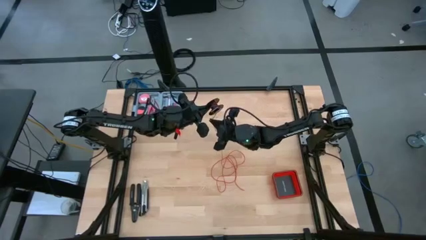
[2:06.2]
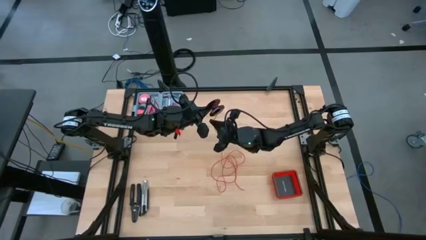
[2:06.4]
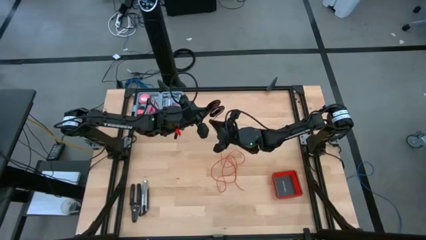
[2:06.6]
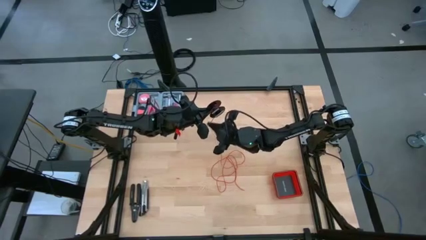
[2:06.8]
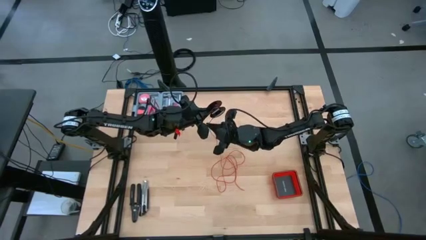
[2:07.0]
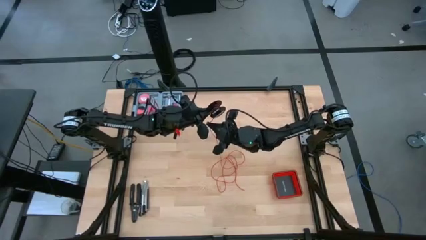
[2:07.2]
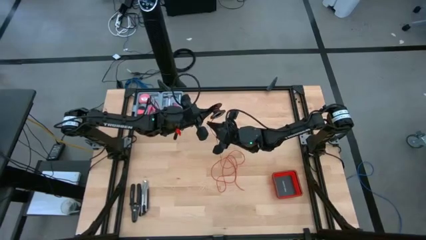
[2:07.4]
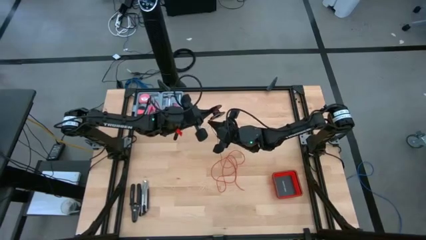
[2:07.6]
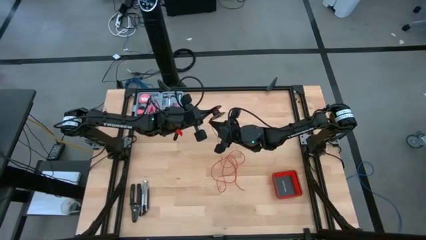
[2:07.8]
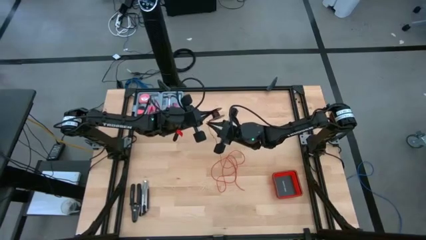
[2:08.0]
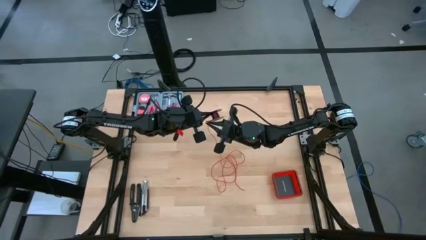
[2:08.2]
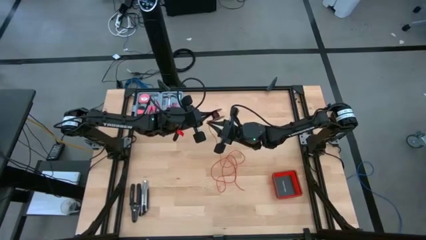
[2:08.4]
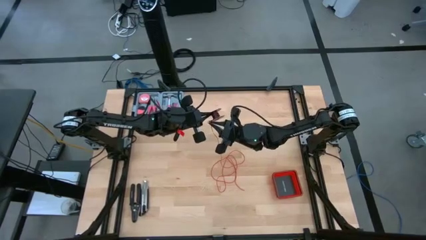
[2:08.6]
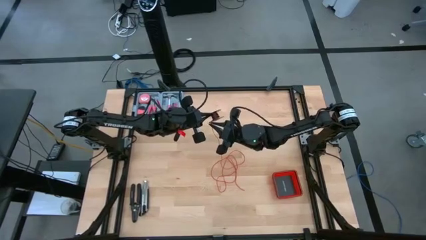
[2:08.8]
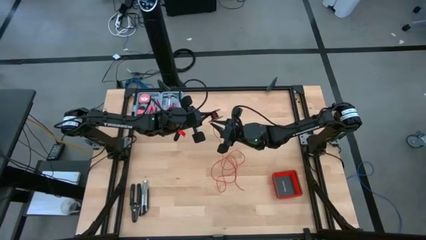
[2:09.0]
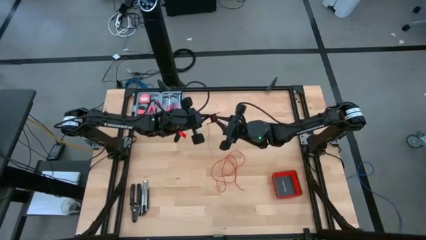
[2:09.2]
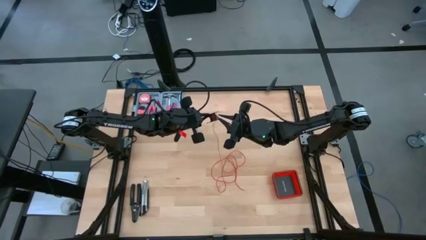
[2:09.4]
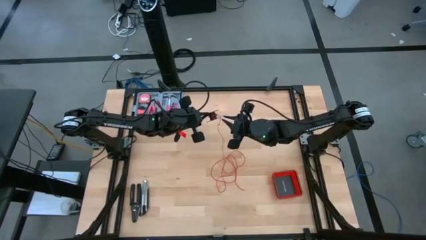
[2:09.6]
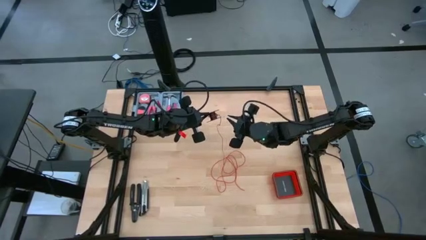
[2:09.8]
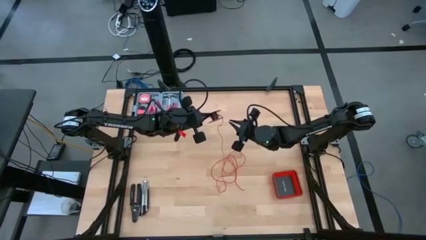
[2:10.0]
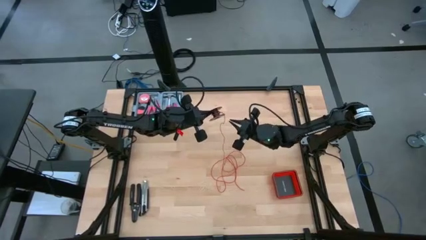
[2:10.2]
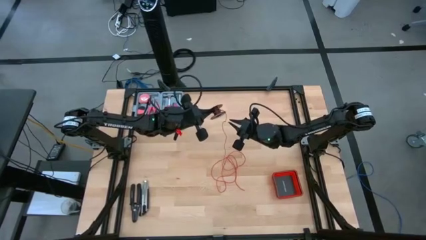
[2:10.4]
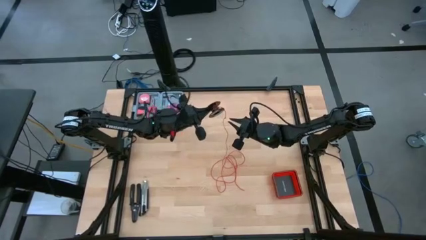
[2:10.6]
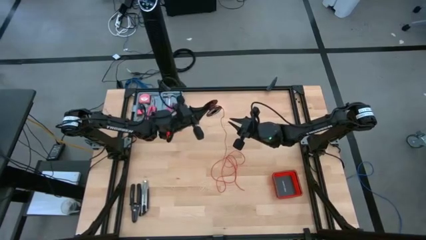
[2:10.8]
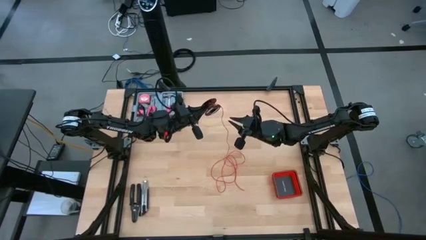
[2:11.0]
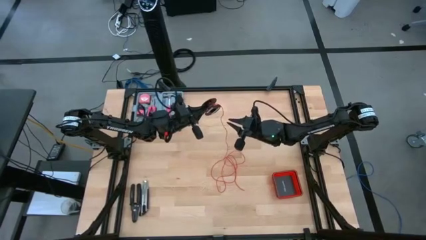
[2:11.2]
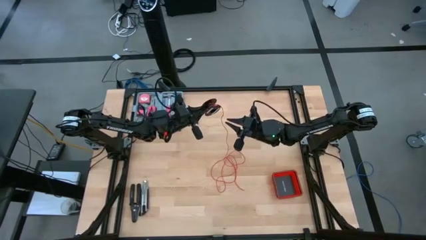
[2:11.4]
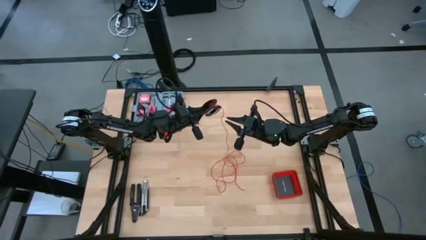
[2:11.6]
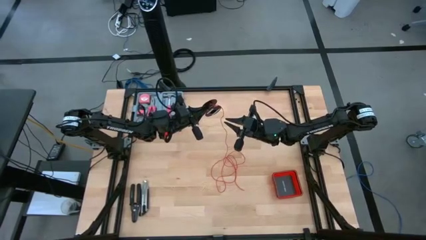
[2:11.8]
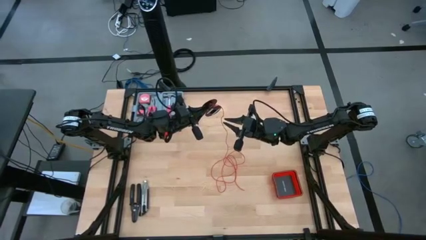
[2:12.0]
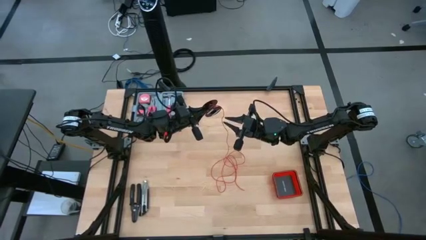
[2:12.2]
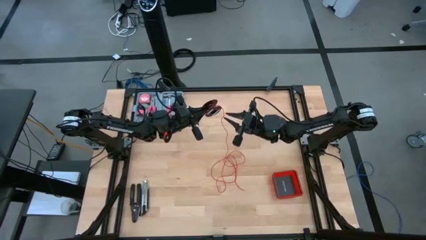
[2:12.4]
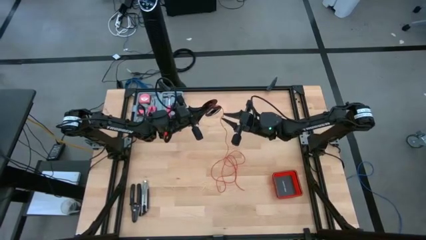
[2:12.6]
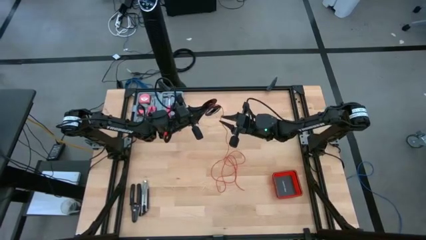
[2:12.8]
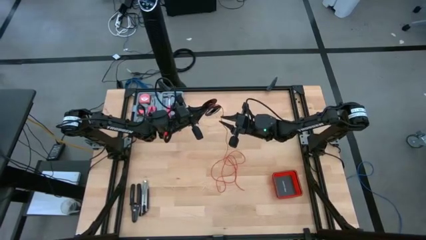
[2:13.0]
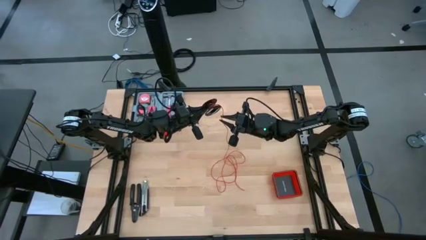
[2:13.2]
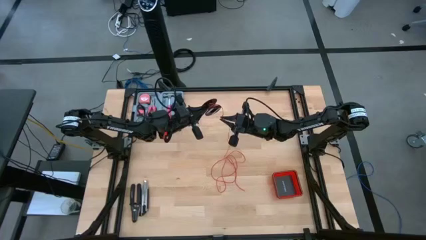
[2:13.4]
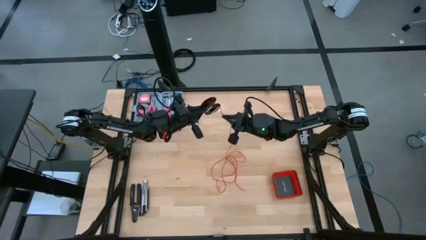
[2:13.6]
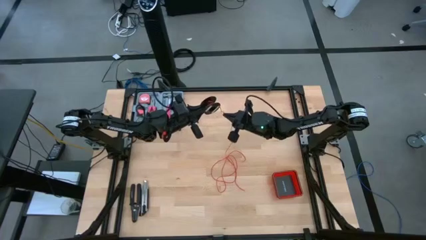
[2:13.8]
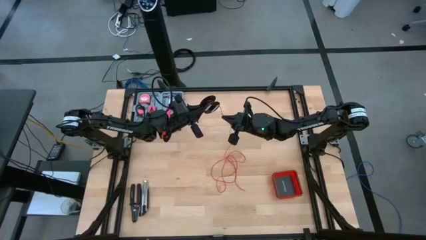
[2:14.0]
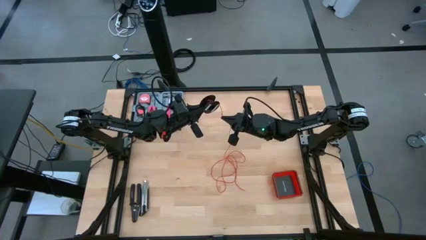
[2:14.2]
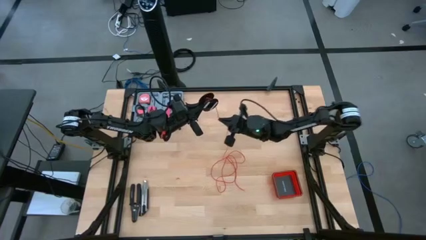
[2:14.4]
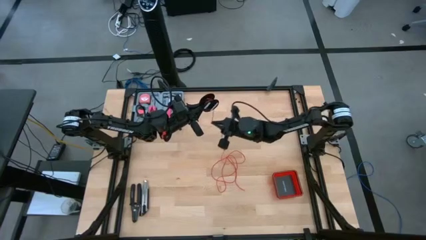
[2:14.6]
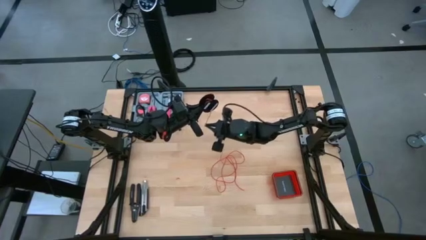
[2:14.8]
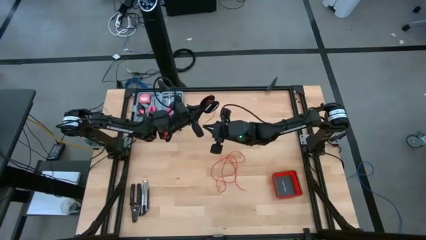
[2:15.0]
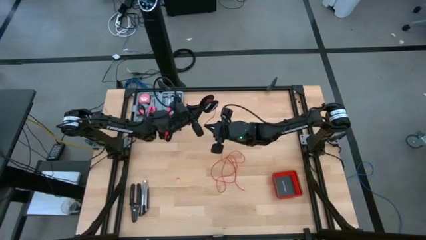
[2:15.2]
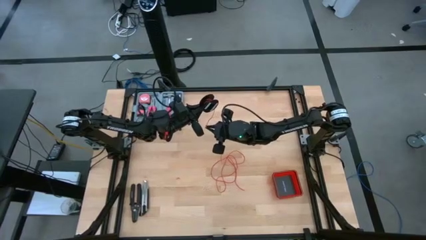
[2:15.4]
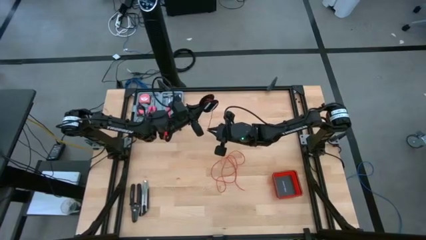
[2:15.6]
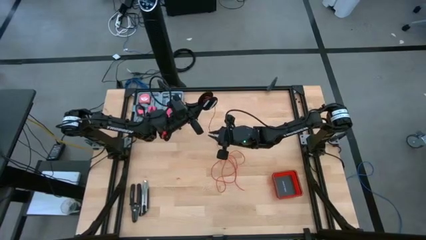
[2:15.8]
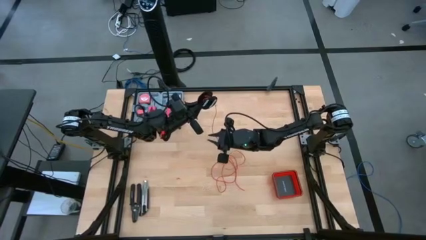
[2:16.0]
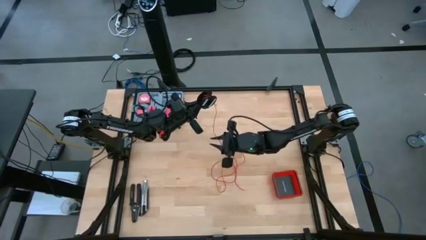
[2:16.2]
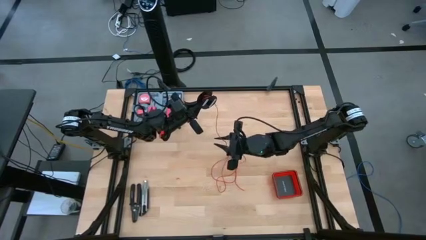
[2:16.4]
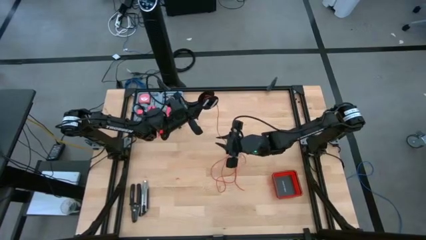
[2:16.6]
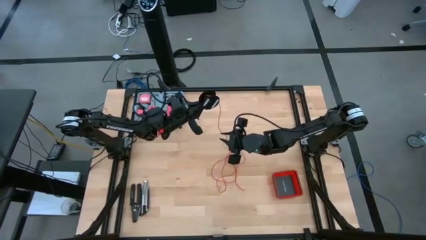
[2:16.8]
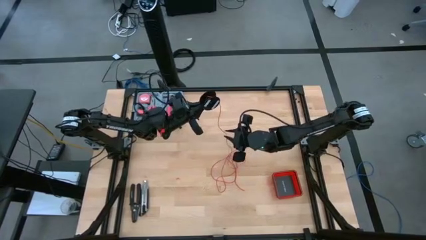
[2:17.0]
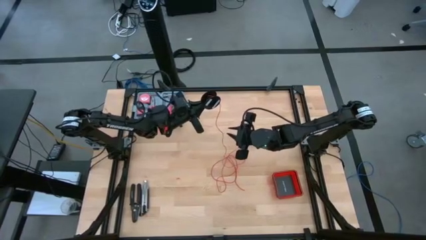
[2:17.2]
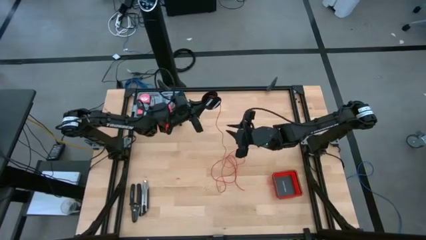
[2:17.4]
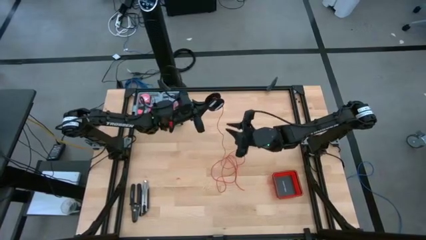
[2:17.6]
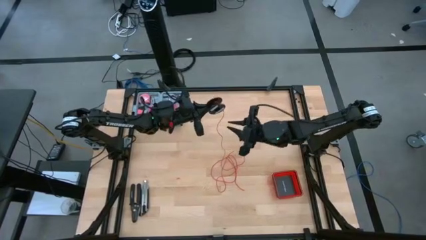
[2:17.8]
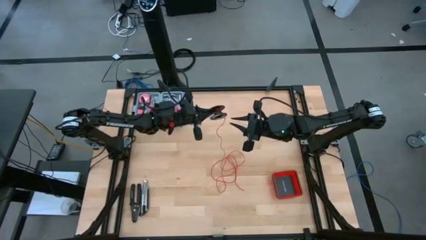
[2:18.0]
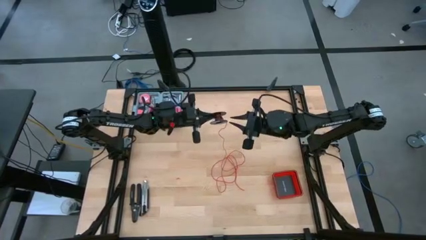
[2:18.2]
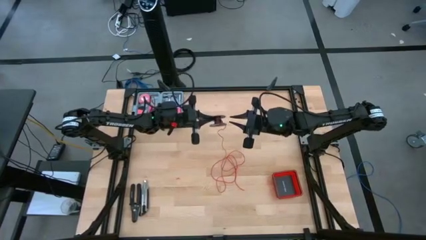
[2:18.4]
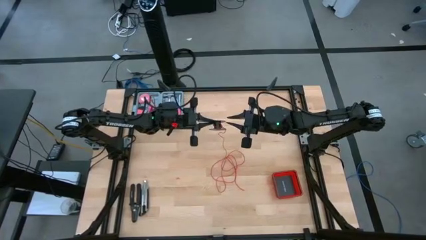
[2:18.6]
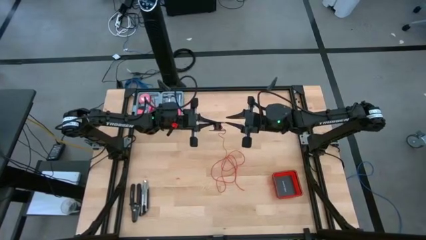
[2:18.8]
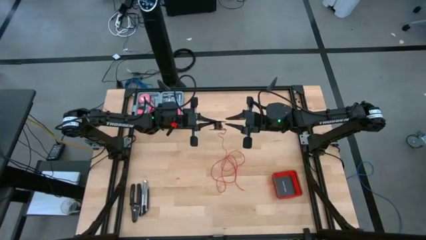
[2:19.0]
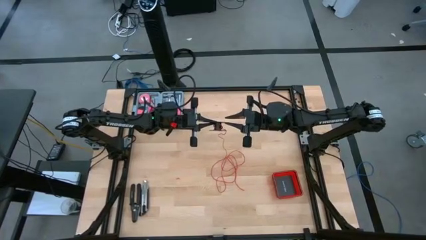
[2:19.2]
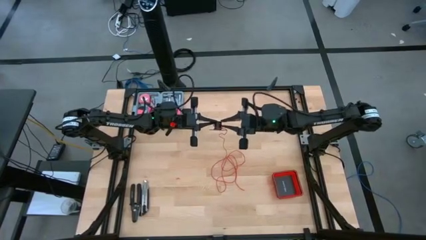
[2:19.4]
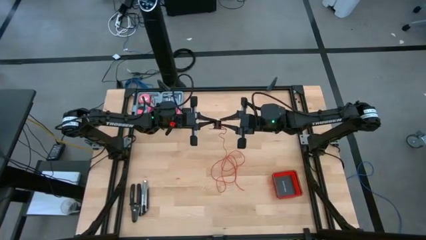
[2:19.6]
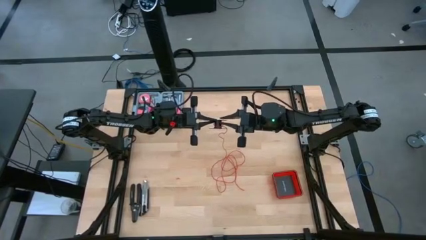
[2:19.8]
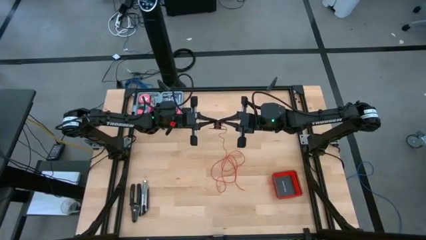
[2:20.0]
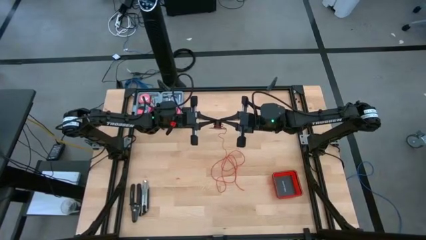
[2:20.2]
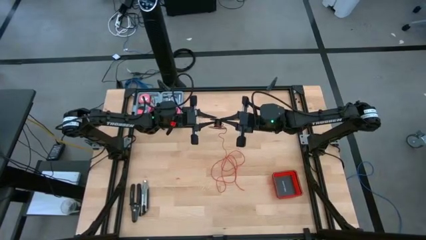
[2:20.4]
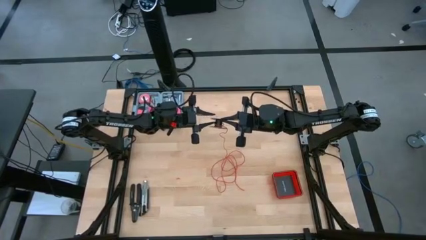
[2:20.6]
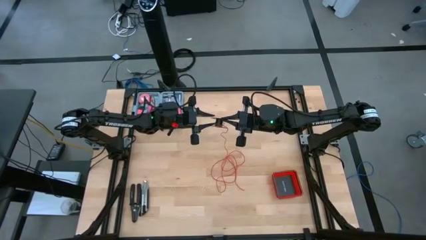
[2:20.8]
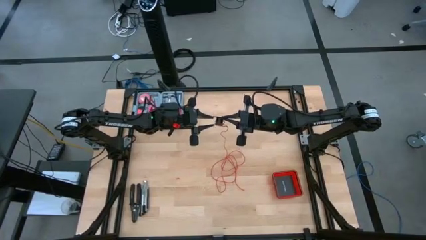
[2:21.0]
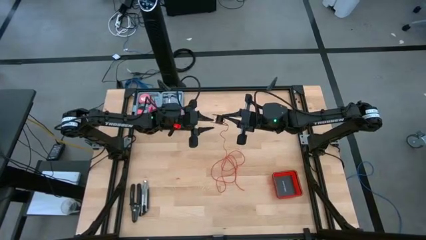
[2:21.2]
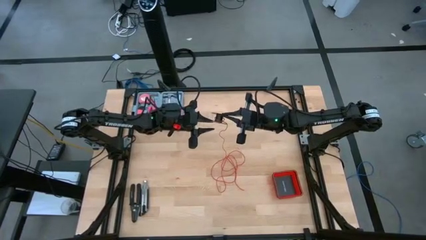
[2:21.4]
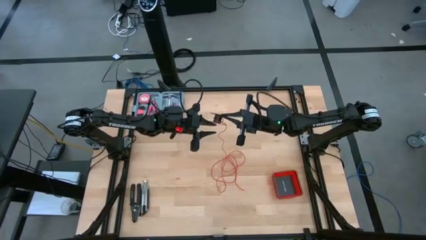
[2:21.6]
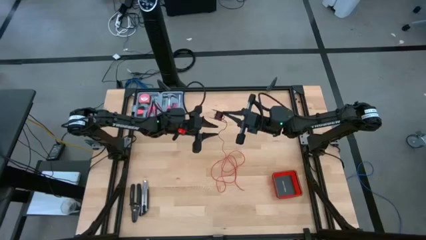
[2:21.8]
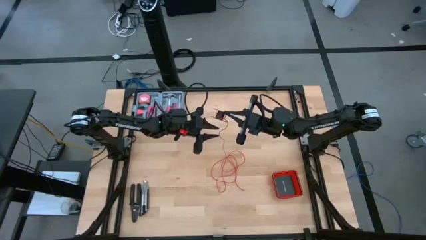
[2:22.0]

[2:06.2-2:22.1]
Task: Coil cords
Coil the red wire onto the spool
